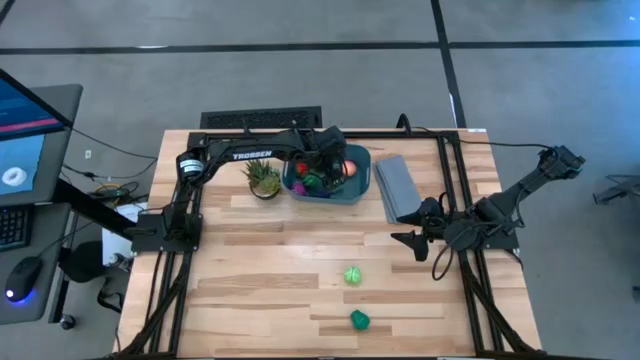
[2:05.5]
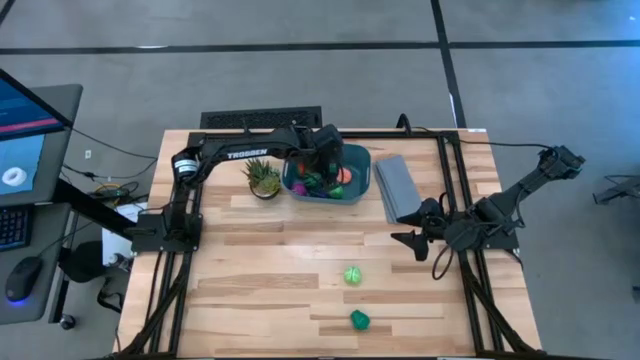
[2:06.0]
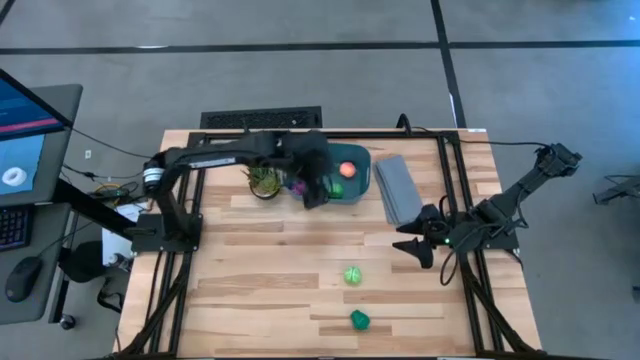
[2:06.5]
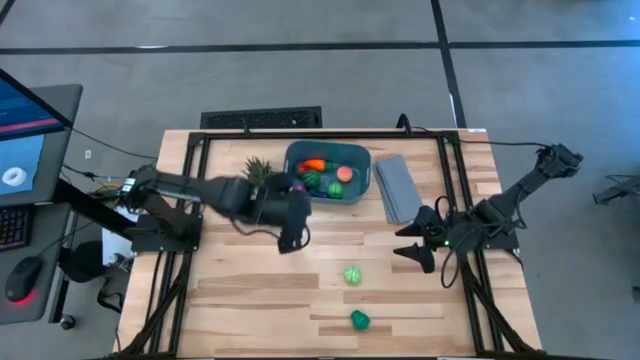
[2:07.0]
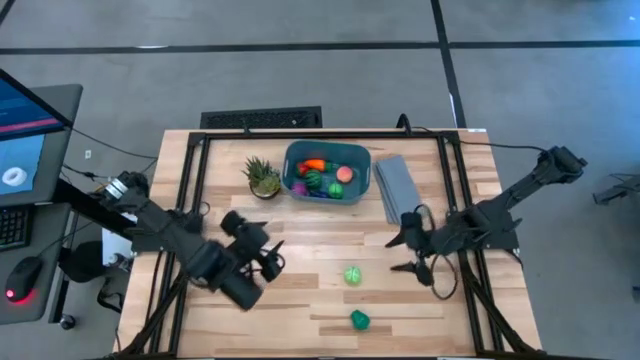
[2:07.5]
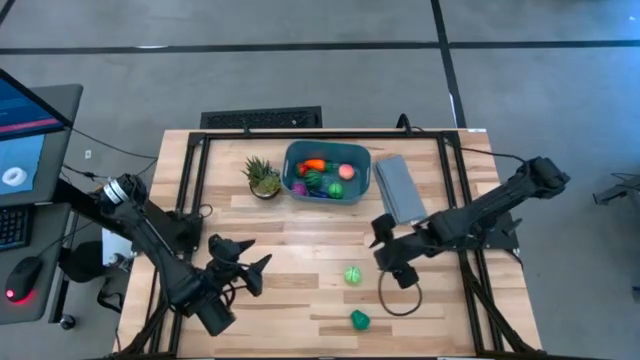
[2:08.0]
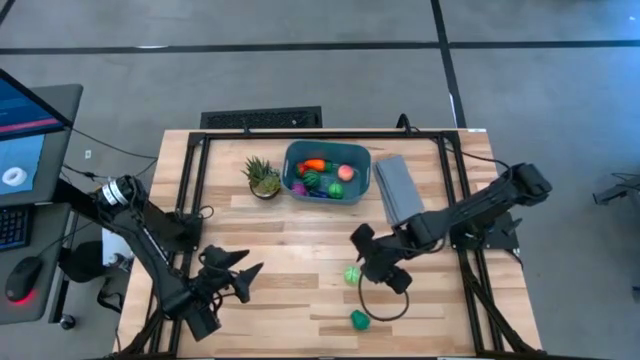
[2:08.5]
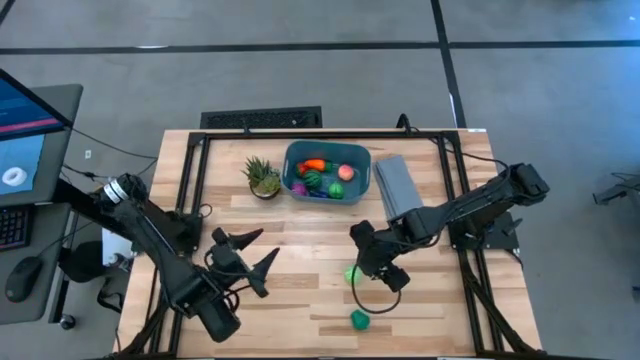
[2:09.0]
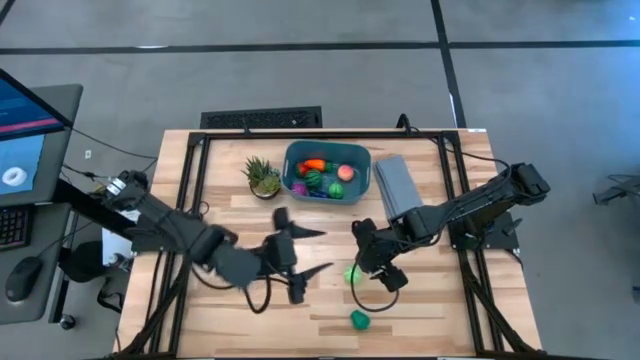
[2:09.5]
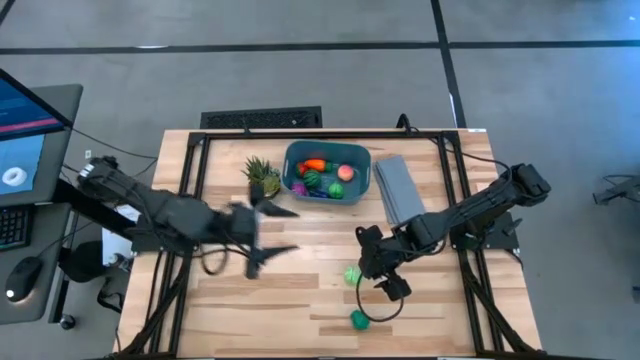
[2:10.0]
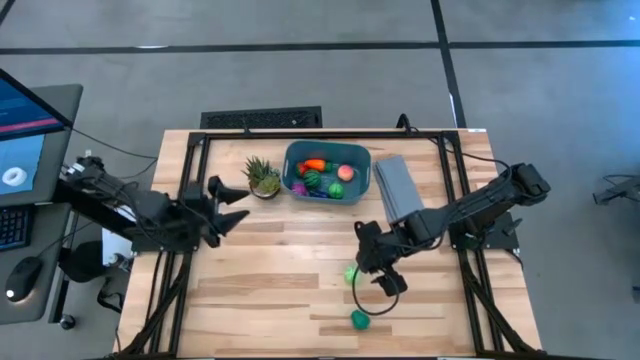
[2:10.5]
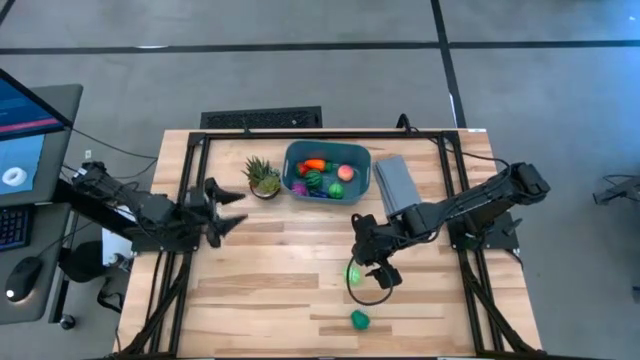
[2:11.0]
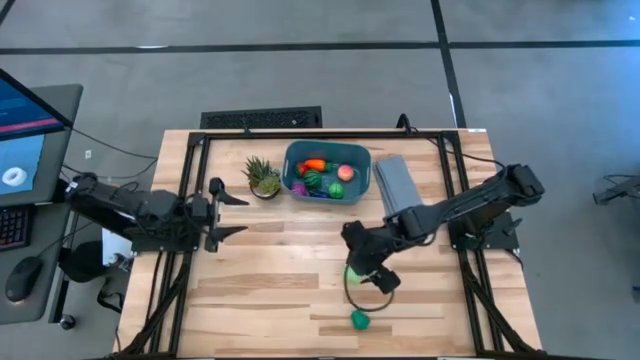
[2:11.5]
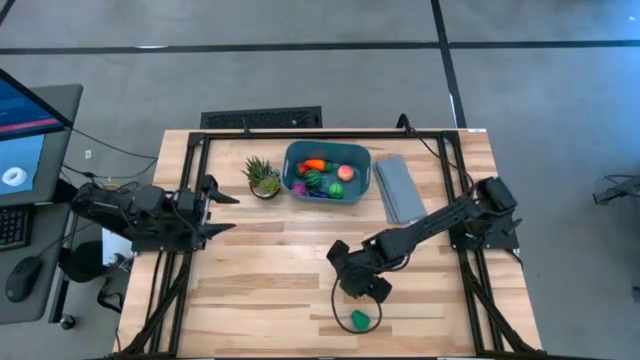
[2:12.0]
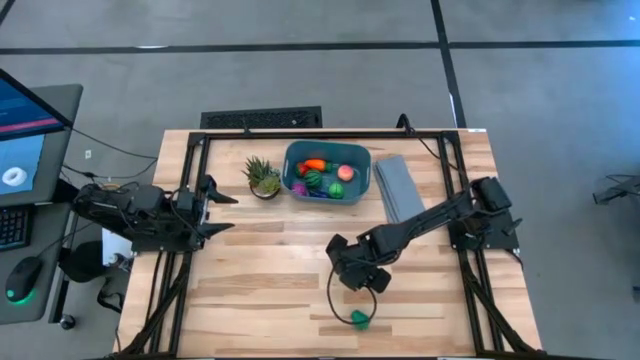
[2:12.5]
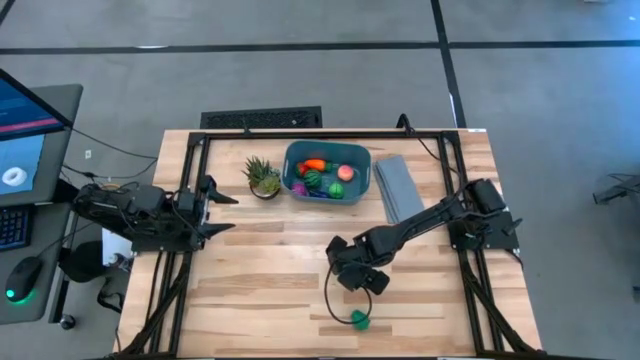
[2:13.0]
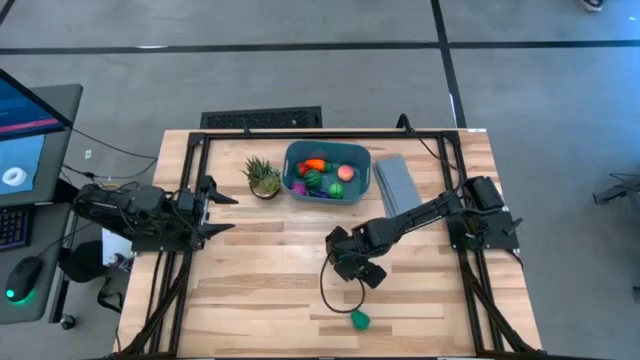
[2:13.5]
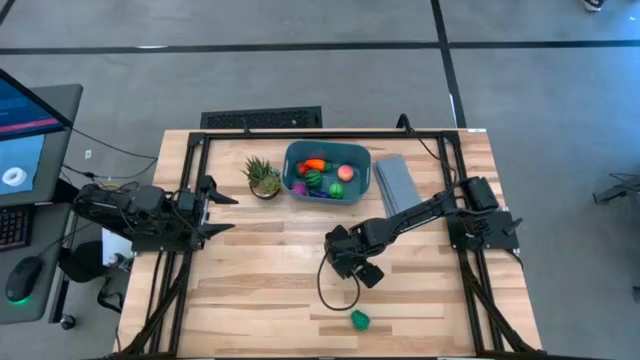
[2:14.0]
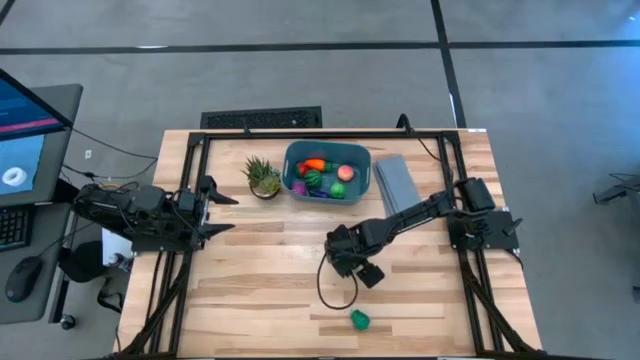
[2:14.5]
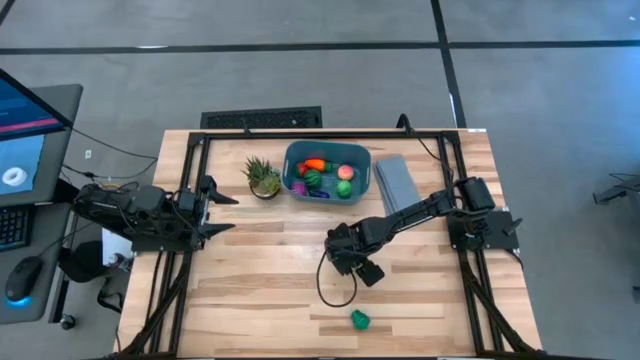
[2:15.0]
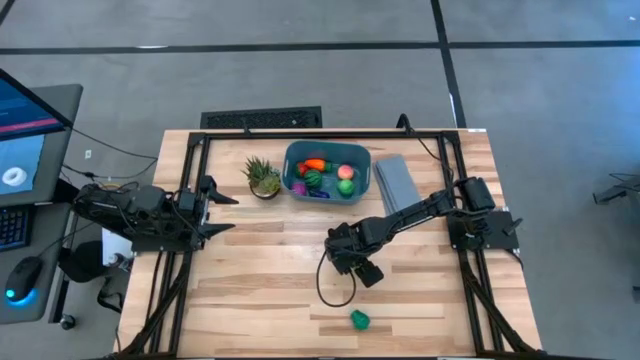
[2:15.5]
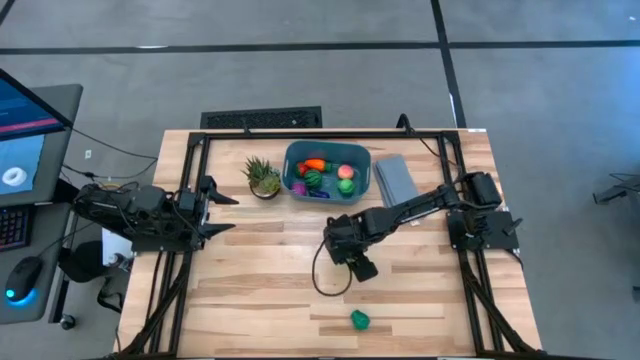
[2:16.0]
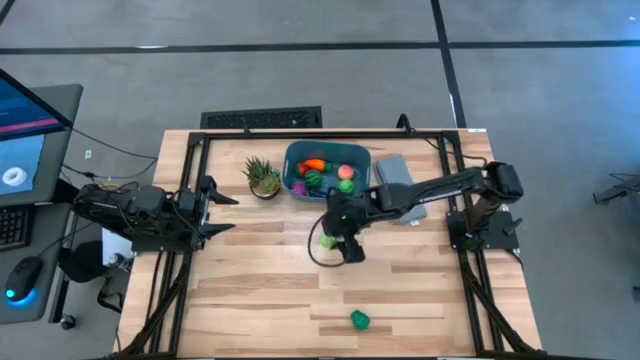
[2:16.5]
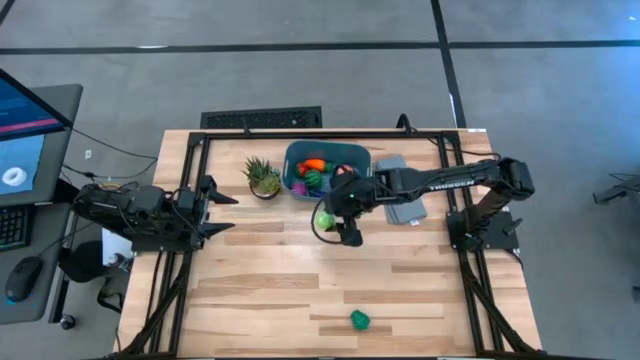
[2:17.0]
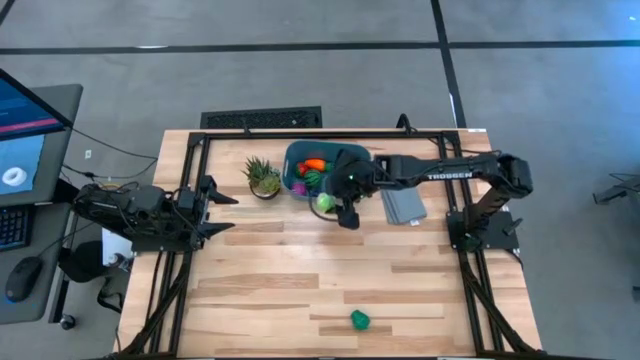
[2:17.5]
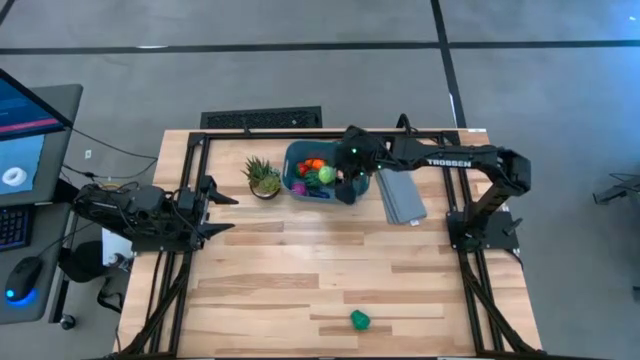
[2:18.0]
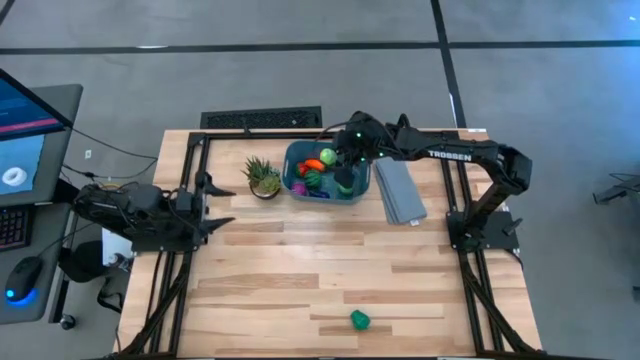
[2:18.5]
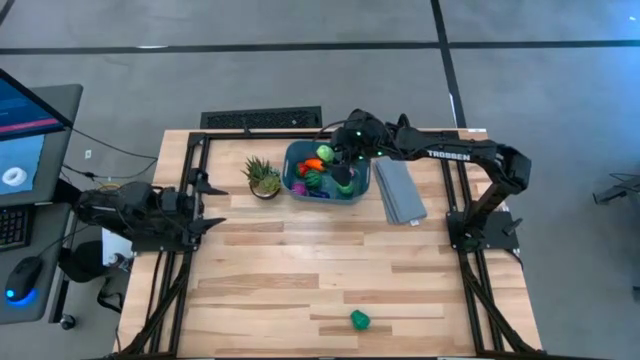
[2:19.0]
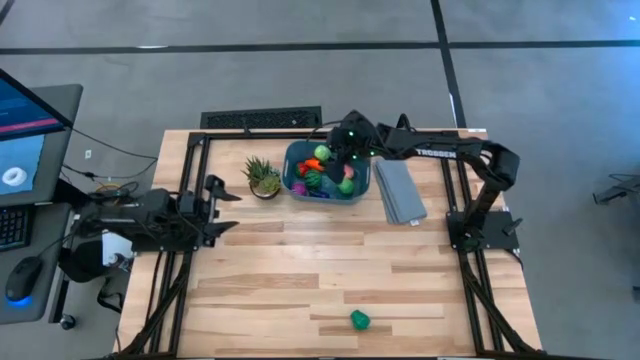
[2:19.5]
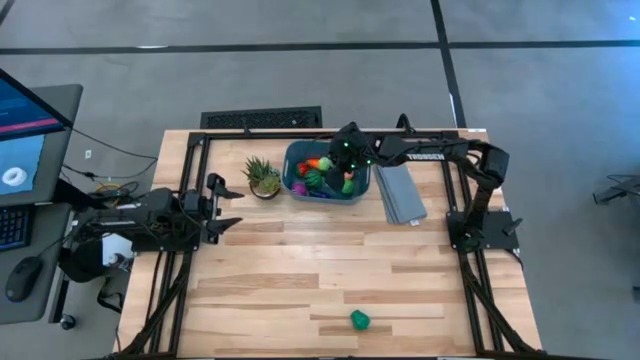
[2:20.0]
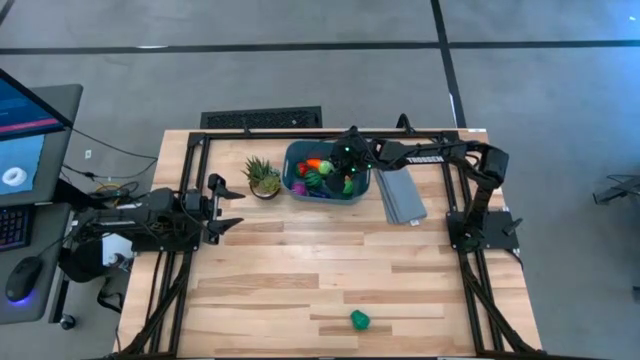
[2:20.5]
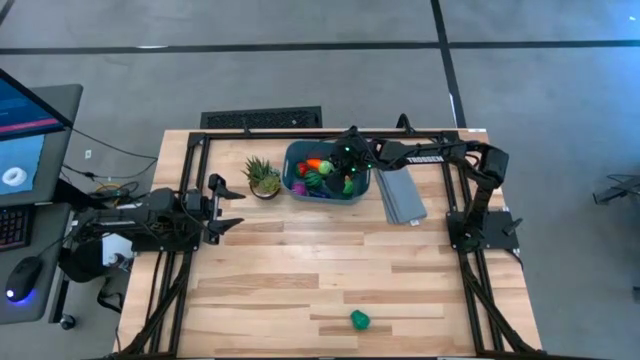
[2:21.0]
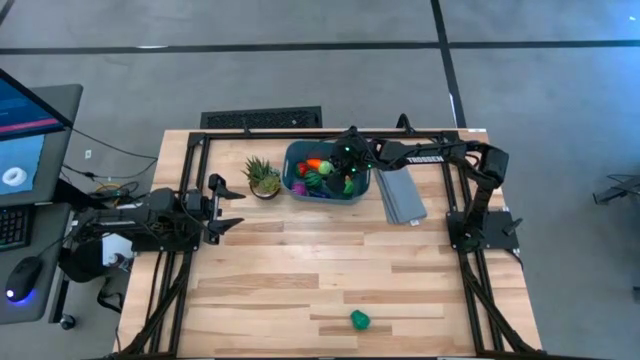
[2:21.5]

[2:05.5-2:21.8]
Task: Pick and placing Produce into tupperware
Put the cabbage into the blue bin

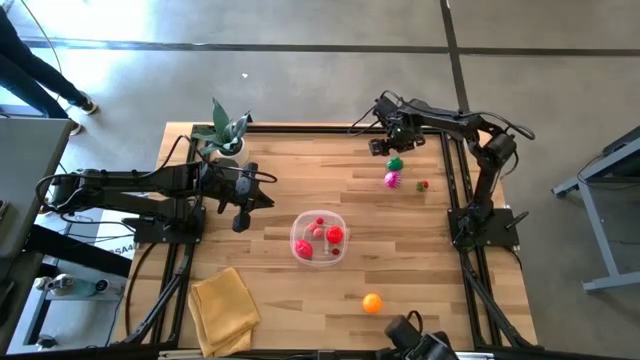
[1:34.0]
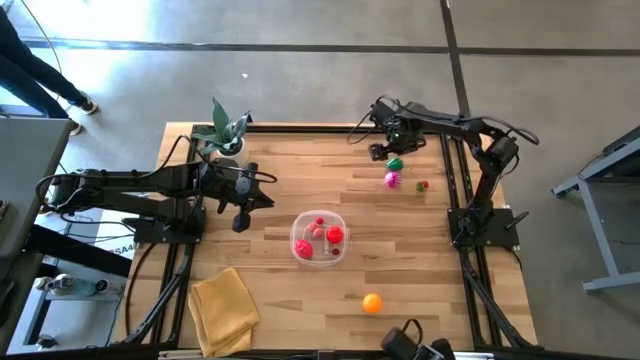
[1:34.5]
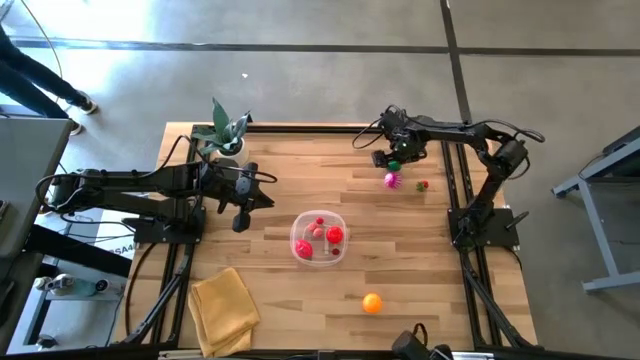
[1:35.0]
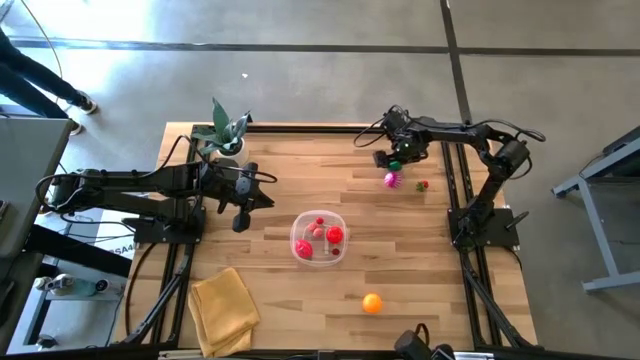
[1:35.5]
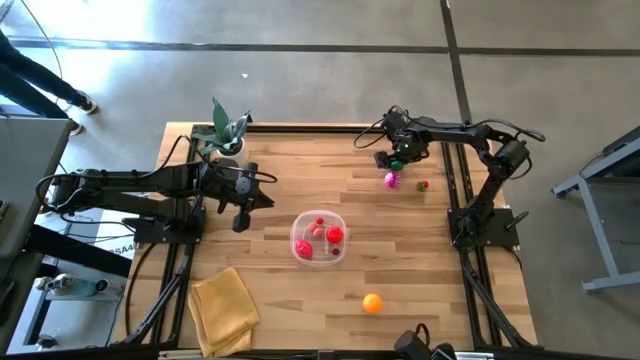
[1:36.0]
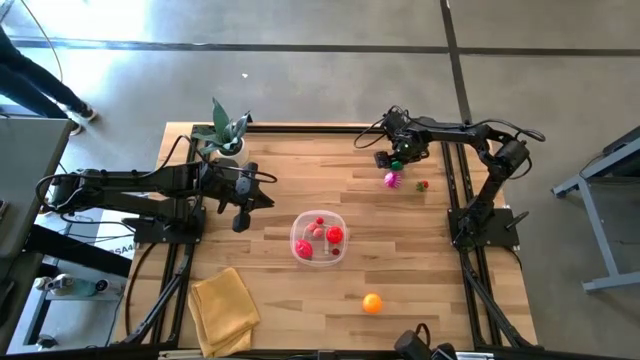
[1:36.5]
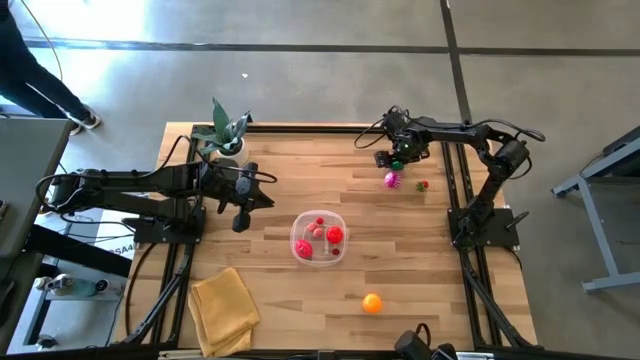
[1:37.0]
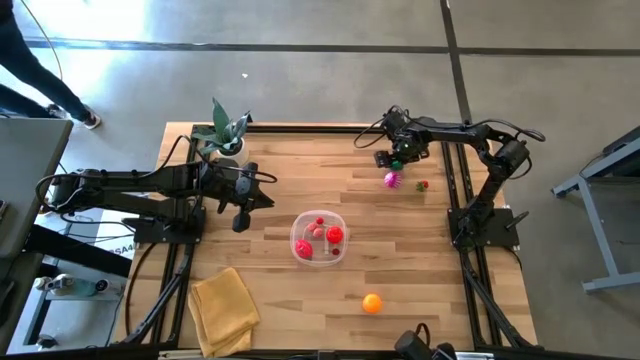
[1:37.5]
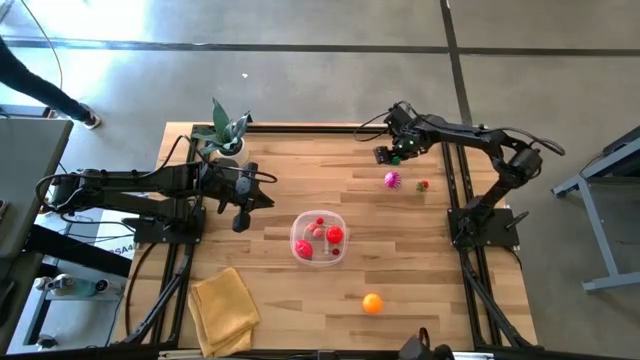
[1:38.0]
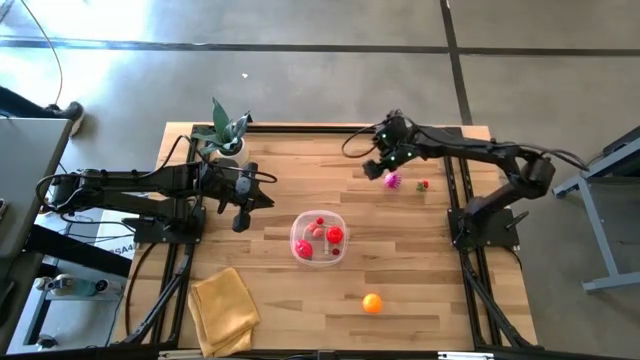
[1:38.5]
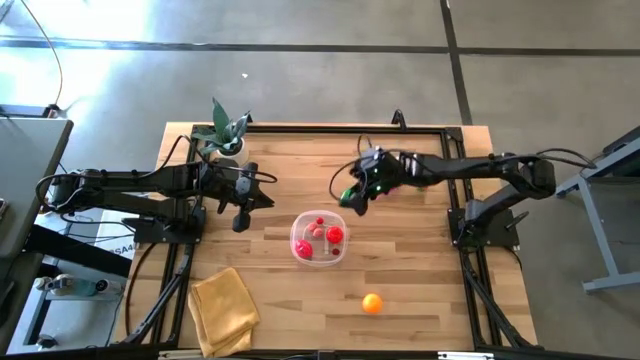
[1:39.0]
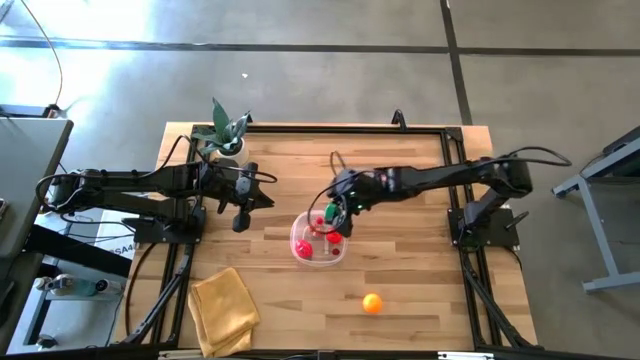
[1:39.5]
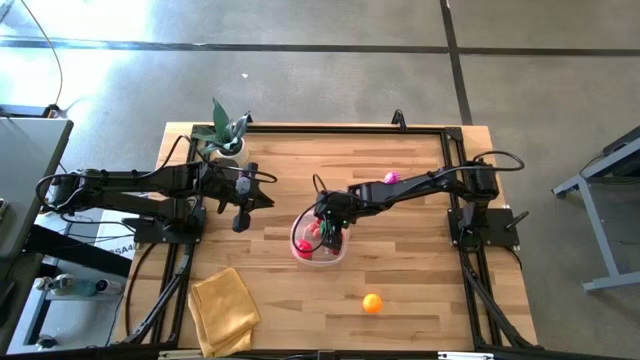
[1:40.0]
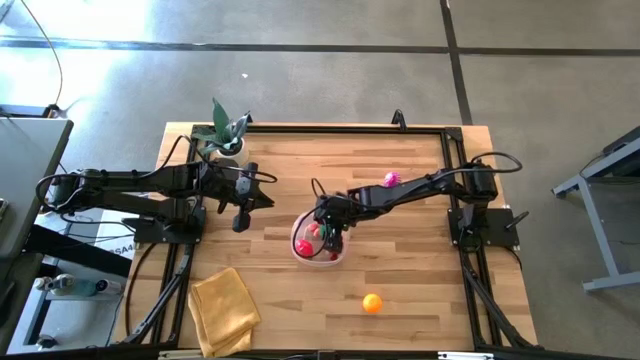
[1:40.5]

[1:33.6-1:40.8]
Task: Pick and placing Produce into tupperware
Put the green bell pepper into the transparent container
